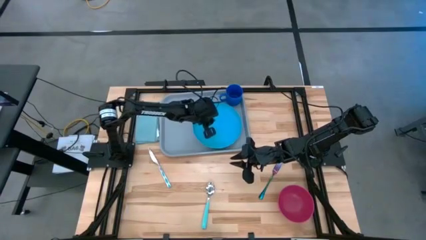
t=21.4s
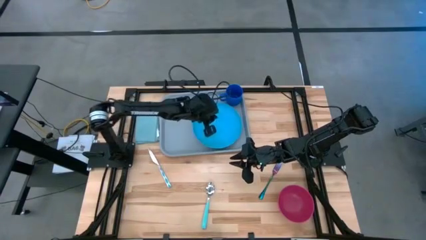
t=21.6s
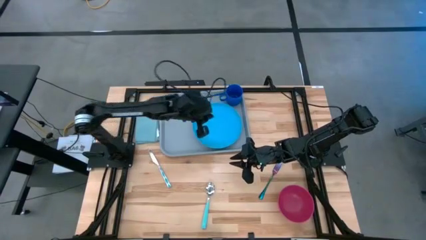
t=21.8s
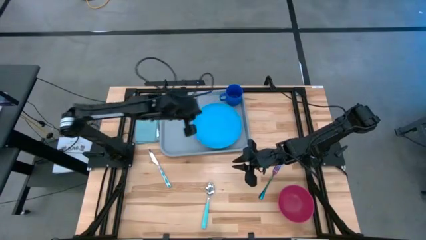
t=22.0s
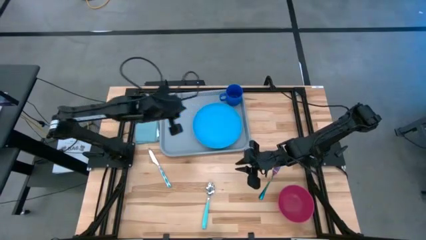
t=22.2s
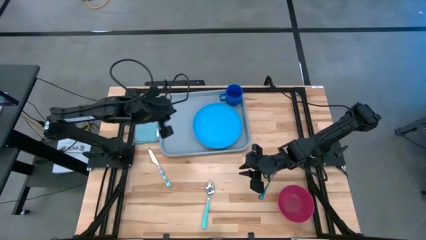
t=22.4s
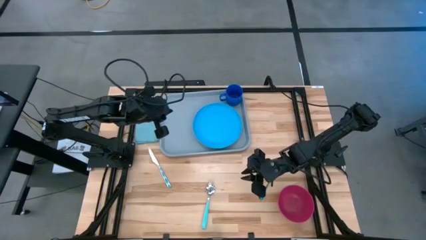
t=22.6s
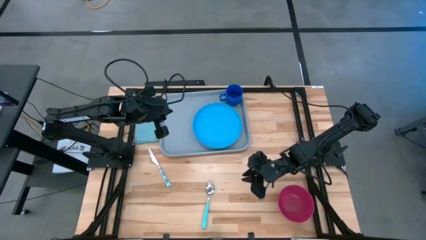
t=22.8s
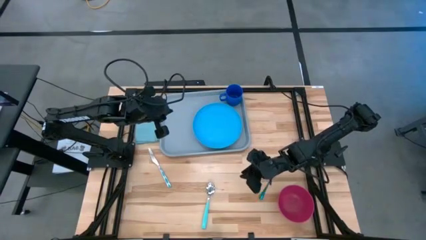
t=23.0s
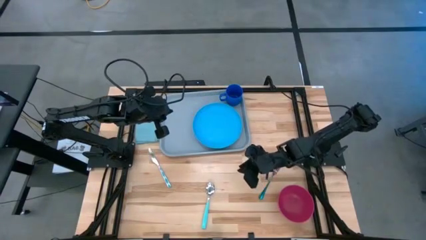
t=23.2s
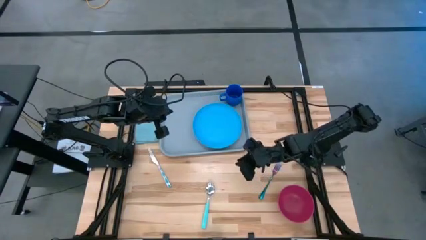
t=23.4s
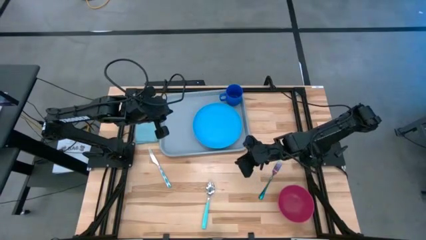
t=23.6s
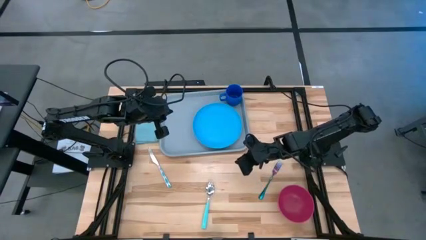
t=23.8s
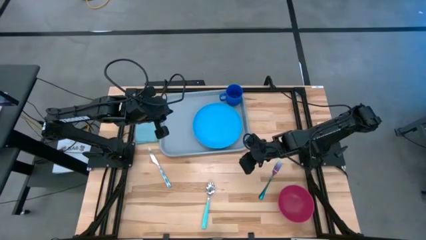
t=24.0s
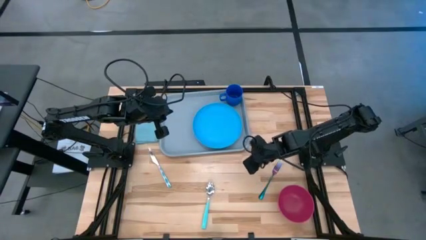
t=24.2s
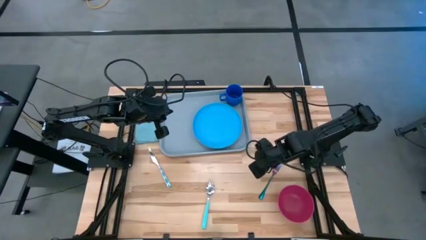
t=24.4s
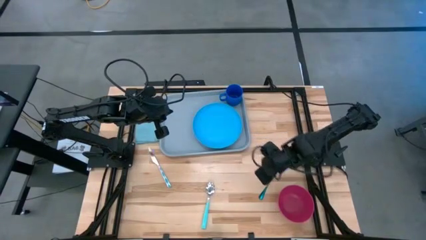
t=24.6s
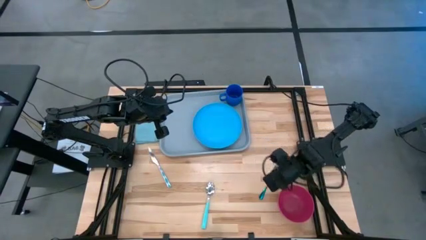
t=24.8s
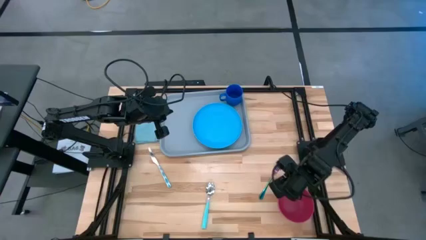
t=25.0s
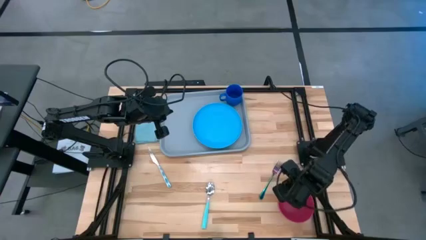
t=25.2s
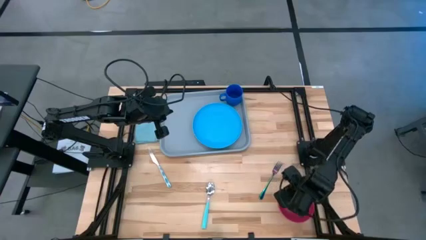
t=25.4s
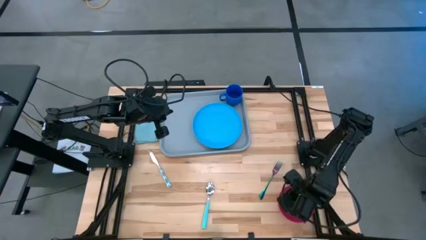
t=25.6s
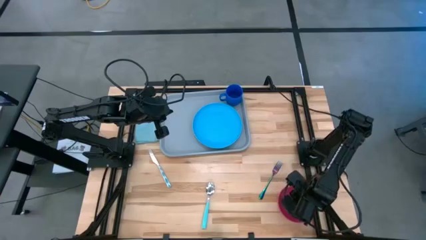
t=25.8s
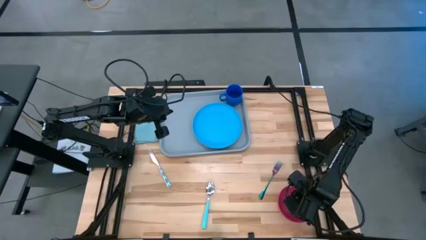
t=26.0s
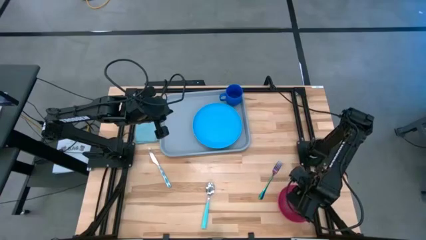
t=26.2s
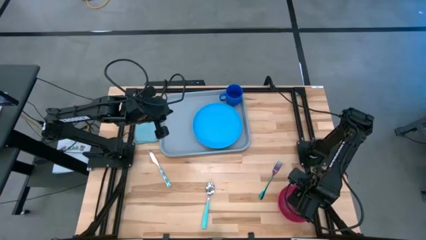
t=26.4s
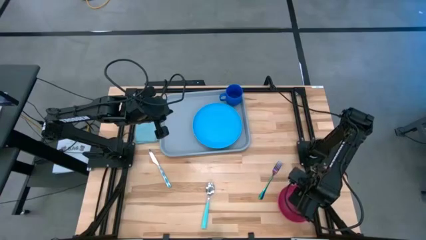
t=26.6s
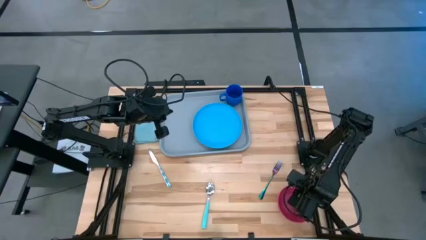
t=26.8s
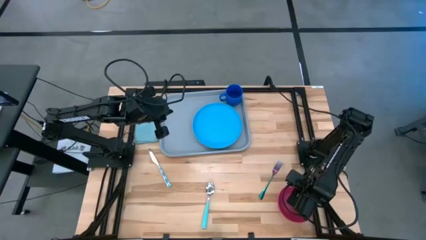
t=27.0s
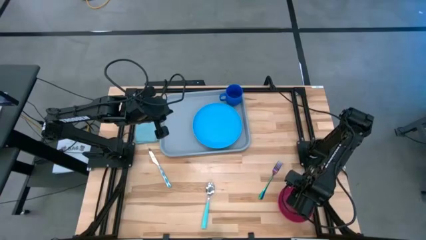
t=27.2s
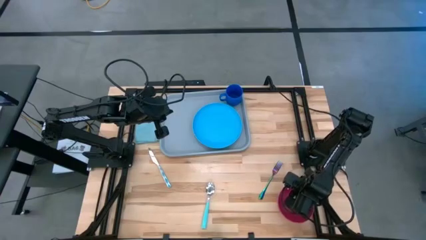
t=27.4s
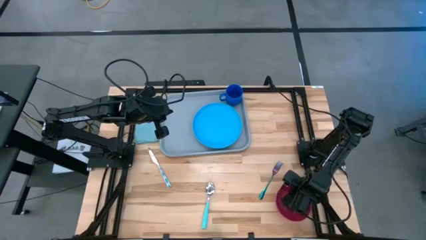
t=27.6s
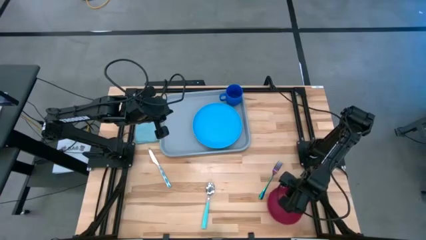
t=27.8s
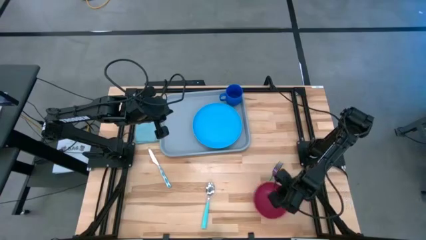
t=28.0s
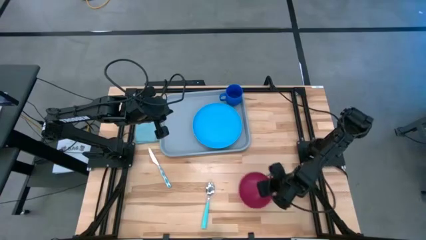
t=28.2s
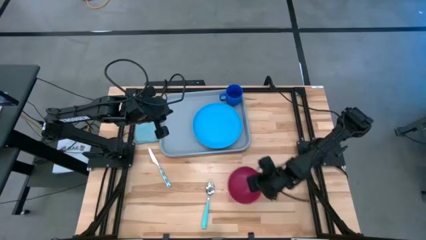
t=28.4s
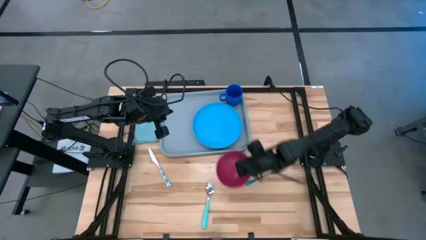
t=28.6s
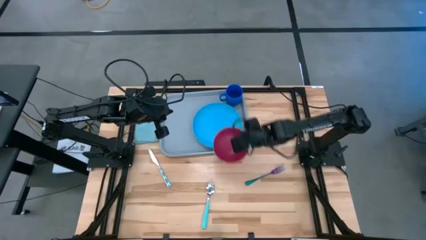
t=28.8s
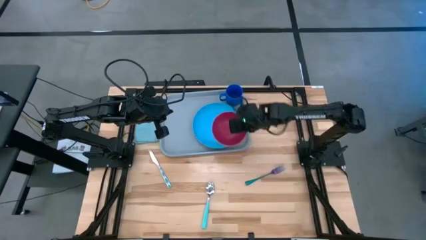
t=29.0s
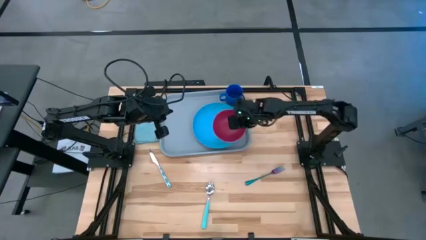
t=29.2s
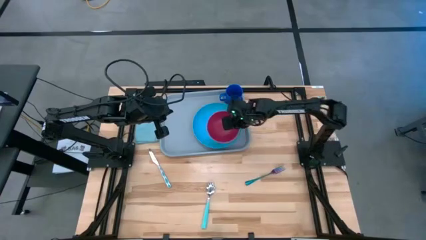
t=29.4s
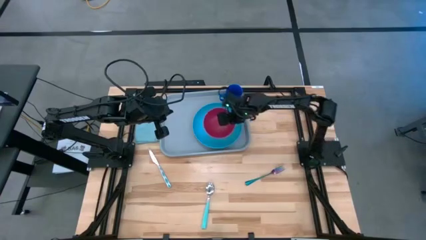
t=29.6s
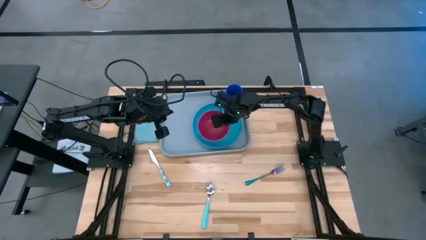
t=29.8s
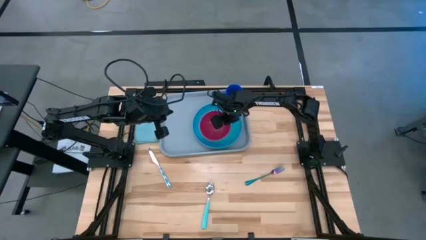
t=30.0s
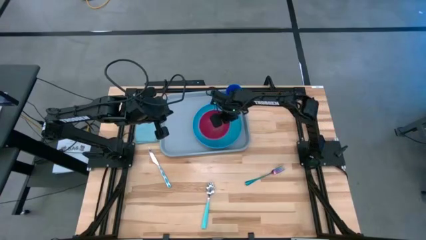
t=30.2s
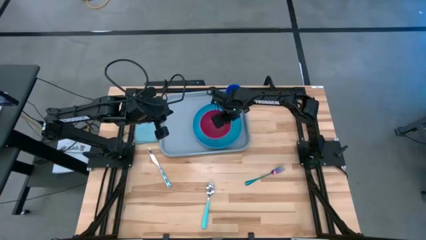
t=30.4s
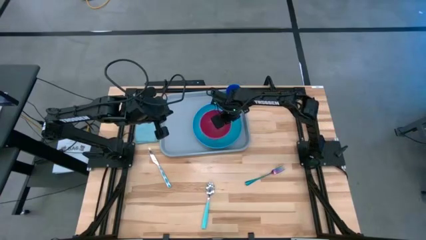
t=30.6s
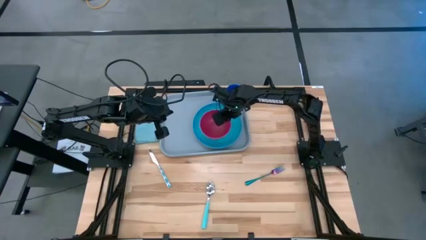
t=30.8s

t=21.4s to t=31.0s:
Task: Set up tray
Put the pink bowl on the light blue plate

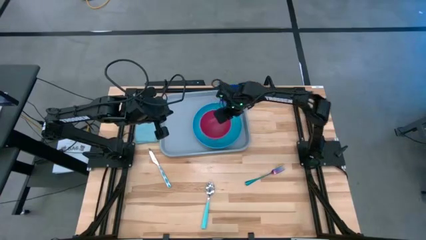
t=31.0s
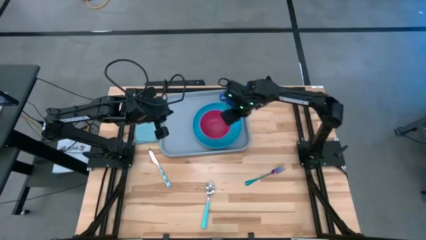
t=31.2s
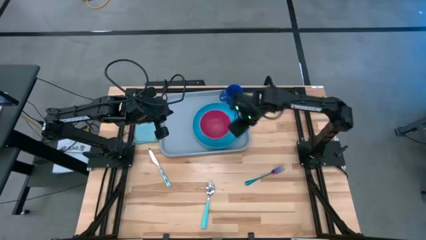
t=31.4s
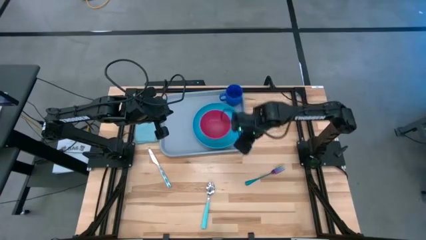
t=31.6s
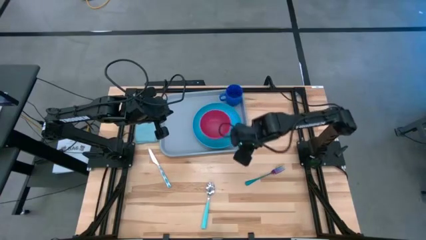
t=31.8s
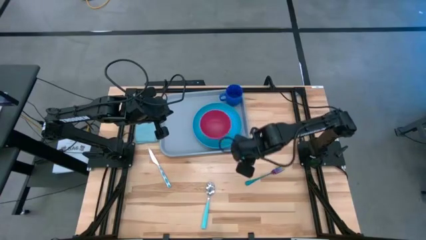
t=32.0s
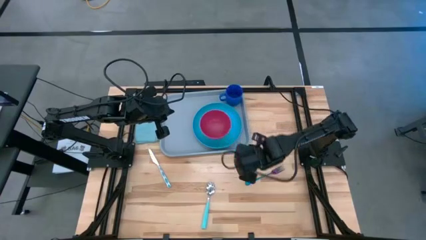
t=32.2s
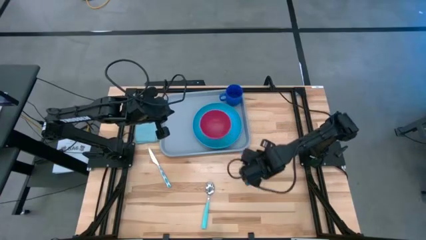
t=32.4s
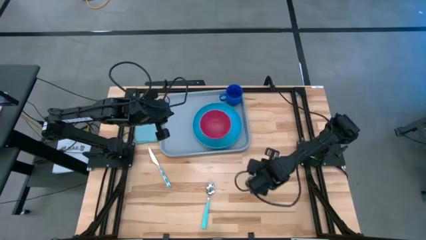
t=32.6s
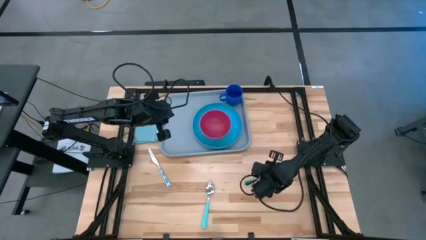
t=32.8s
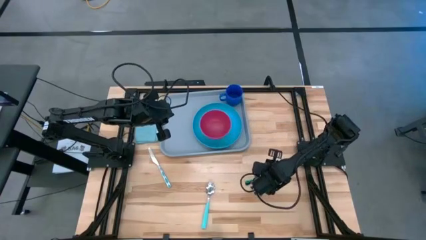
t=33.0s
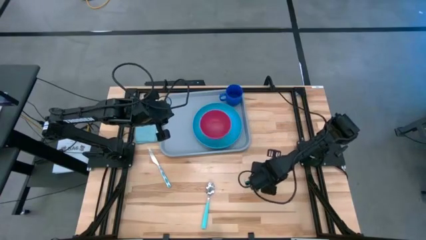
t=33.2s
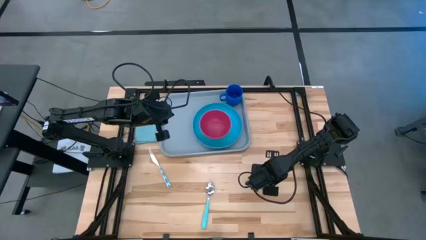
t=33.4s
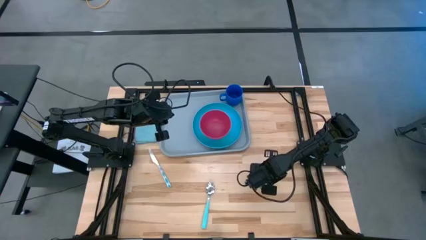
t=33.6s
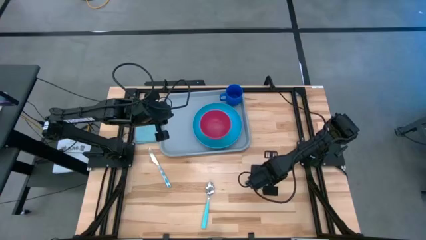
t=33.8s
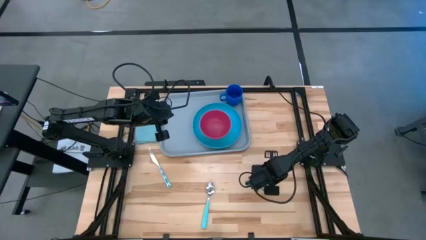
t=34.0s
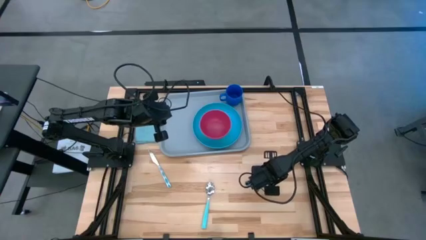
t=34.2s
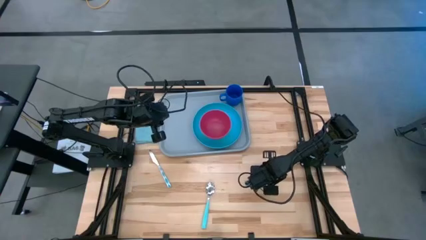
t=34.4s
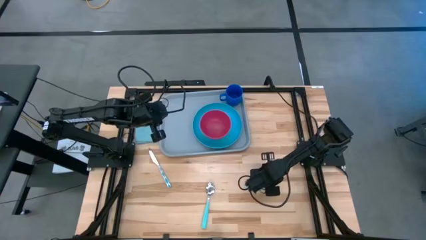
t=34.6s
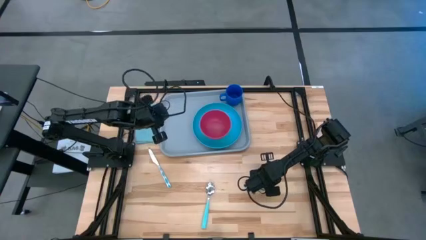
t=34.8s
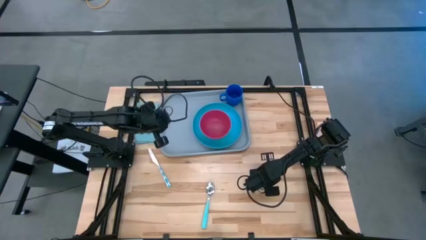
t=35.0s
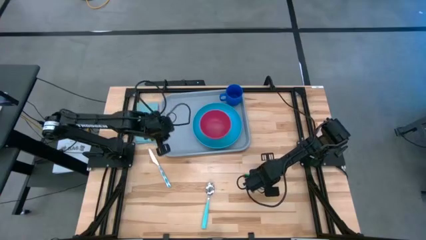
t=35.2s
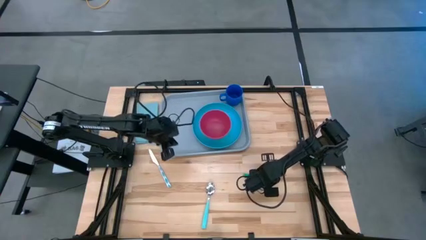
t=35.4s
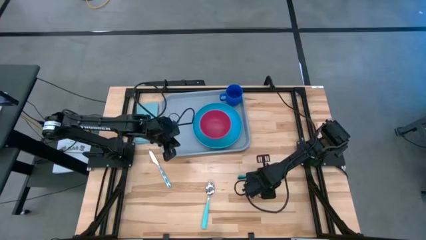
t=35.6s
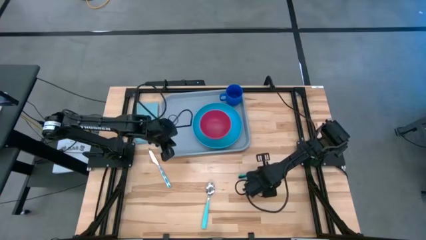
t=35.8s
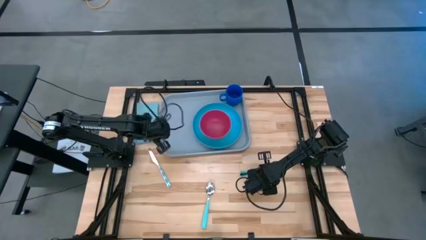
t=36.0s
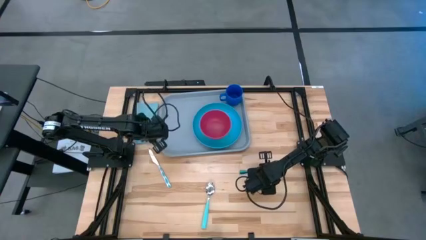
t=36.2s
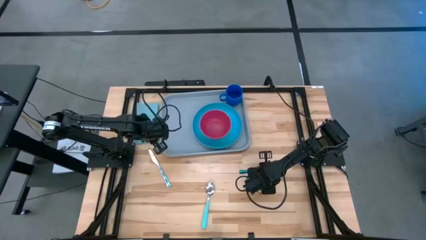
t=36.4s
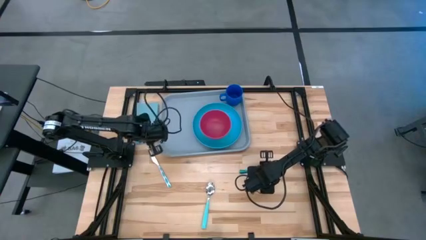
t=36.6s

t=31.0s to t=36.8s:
Put the iridescent fork on the blue napkin

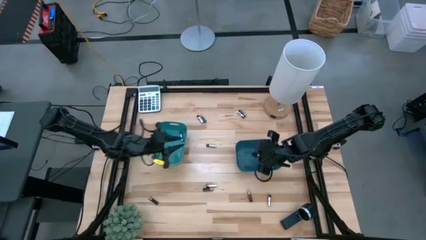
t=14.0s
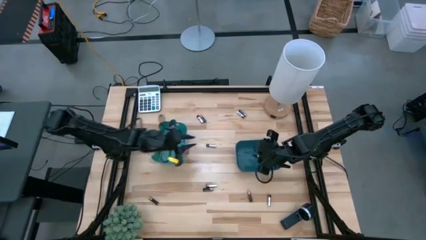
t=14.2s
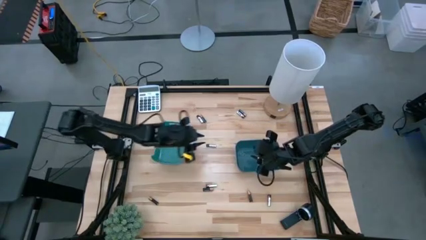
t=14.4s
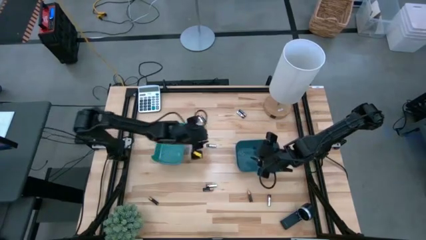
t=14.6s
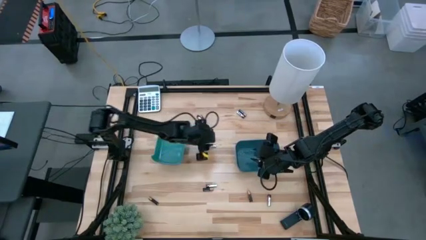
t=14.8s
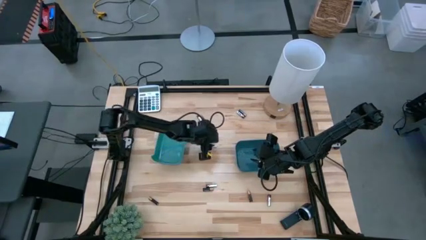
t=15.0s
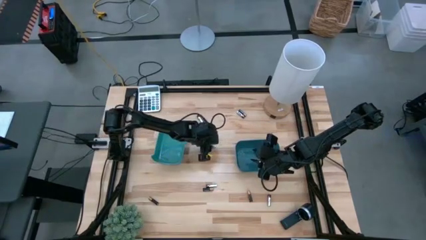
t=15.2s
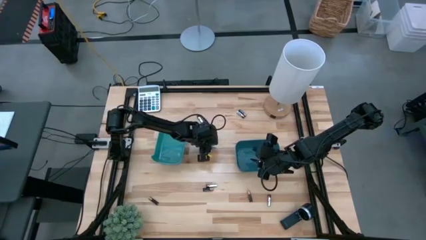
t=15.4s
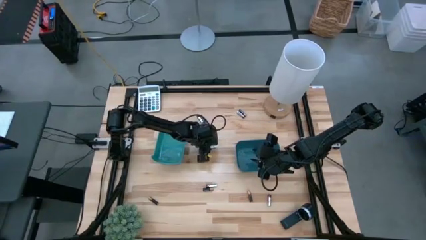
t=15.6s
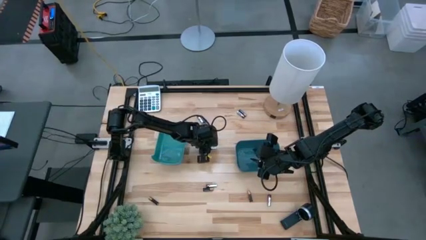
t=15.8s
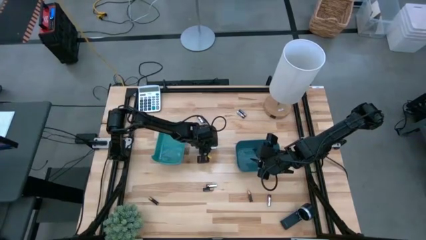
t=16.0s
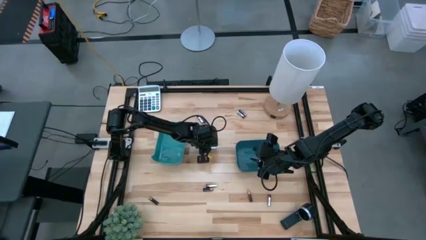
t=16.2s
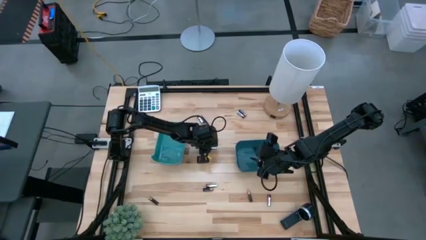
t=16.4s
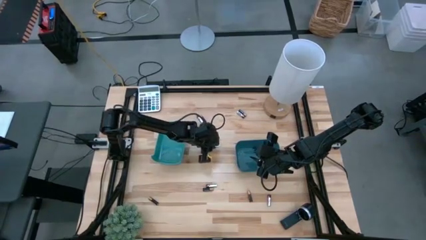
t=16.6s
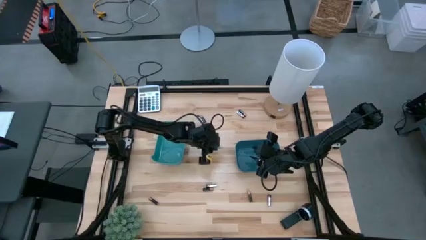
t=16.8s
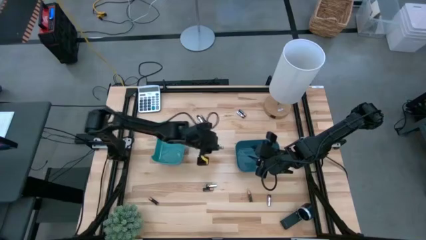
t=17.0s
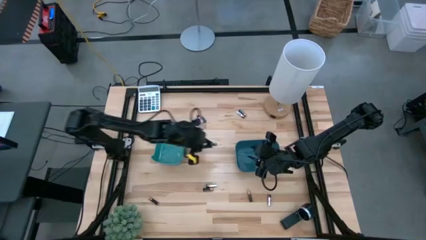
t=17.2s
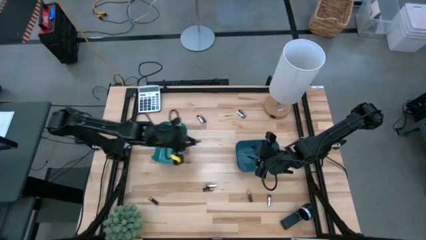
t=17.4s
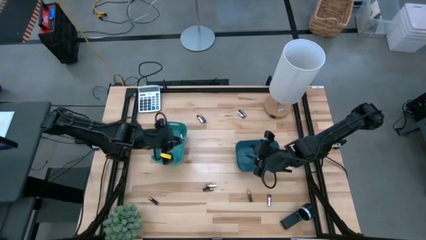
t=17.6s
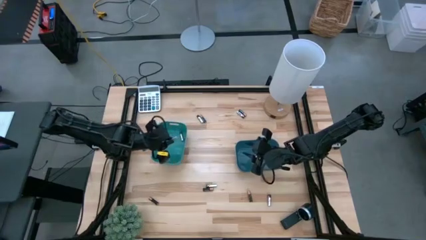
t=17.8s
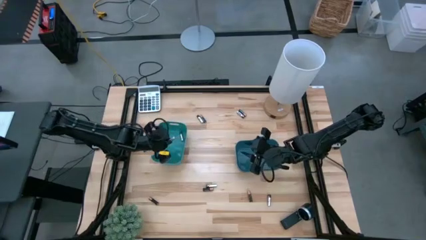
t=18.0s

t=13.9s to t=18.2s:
Task: Sort batteries
Put the silver battery into the green bin
